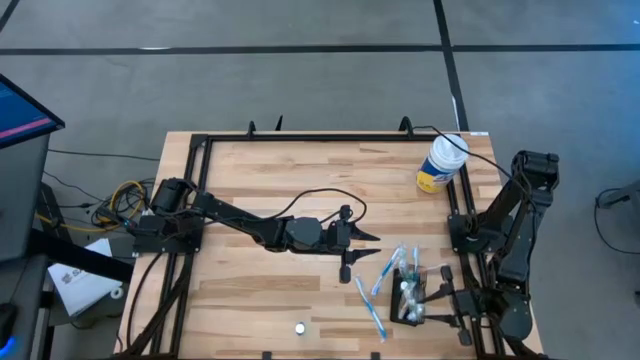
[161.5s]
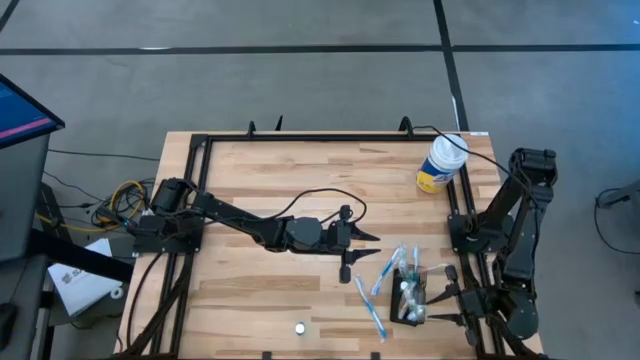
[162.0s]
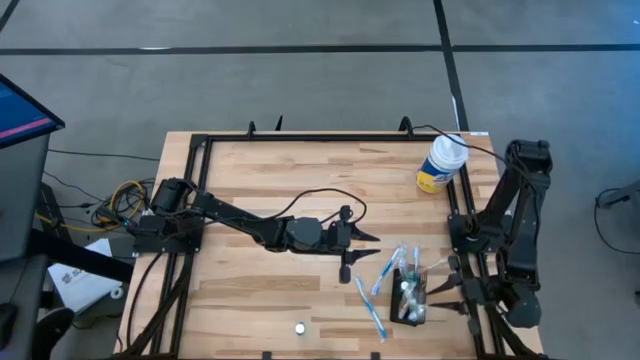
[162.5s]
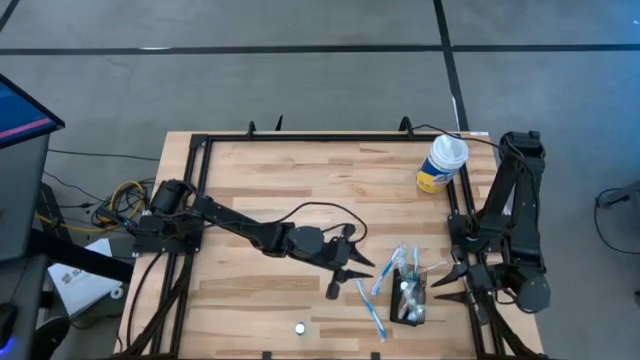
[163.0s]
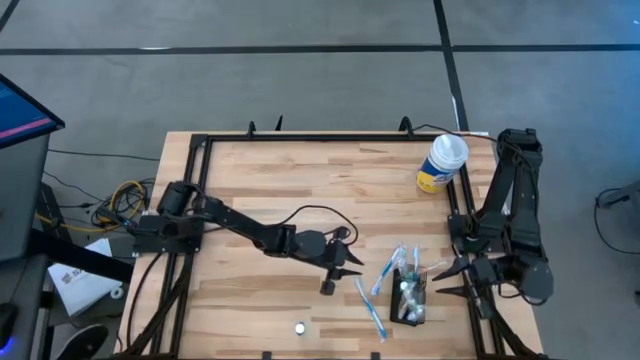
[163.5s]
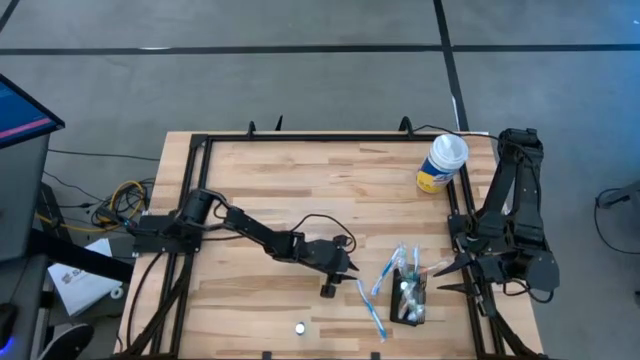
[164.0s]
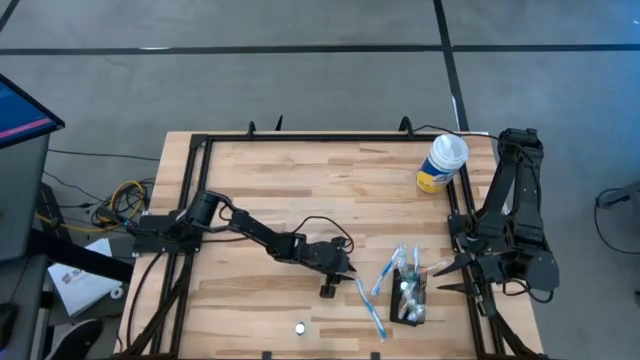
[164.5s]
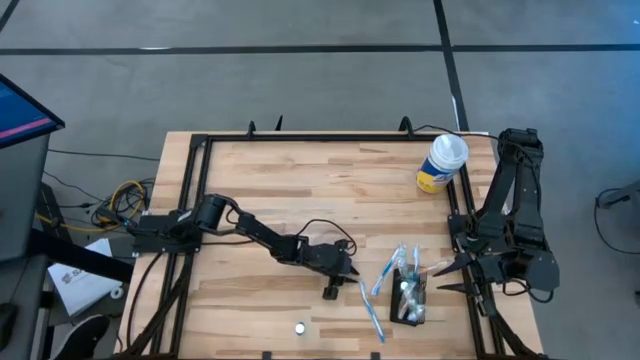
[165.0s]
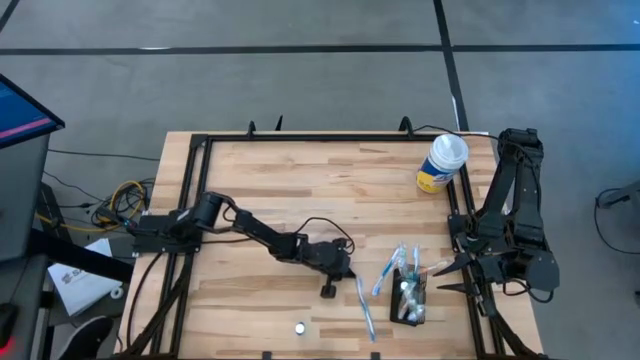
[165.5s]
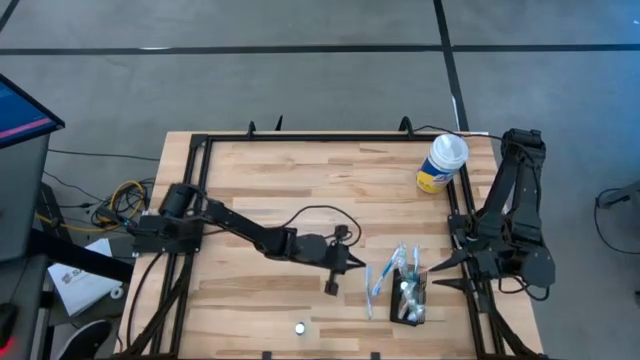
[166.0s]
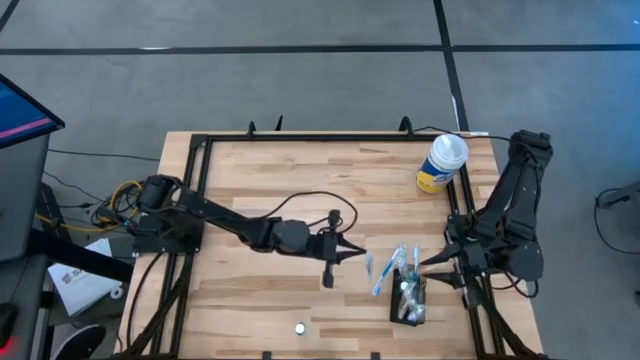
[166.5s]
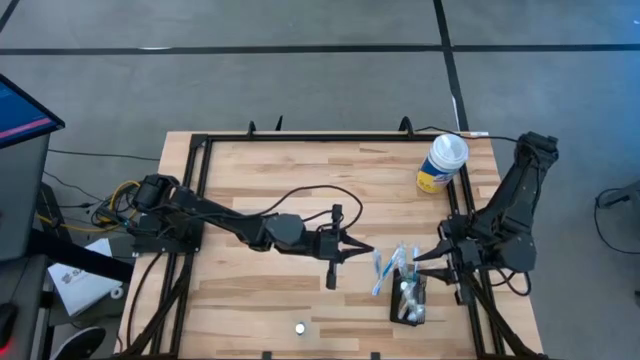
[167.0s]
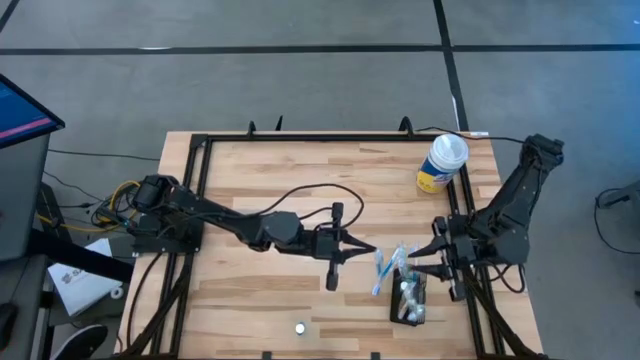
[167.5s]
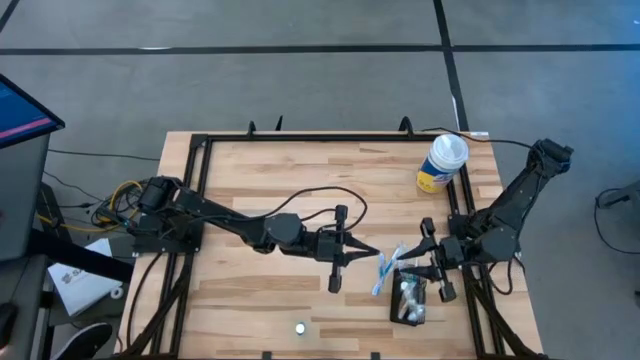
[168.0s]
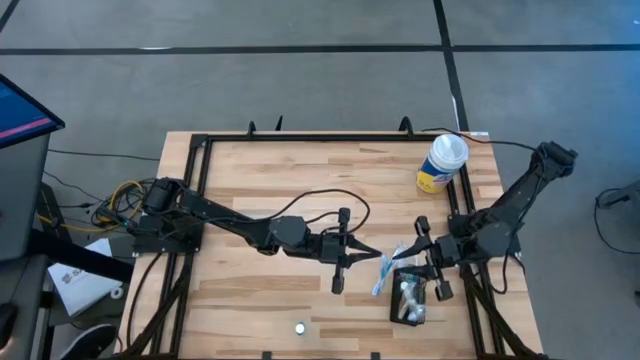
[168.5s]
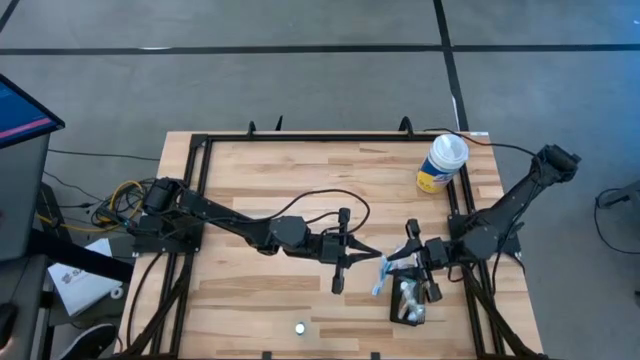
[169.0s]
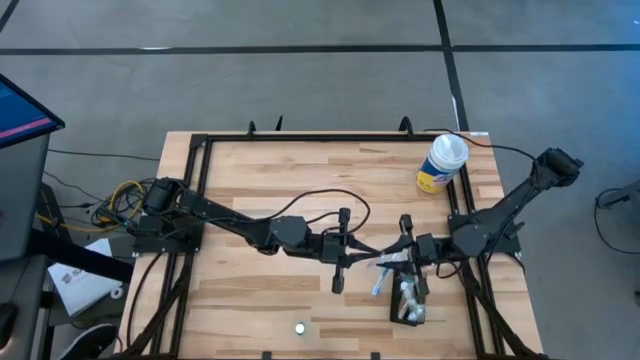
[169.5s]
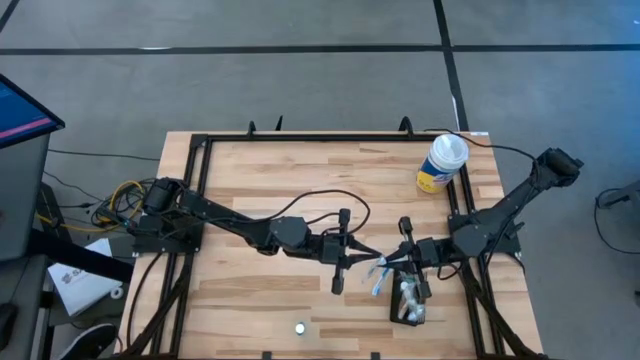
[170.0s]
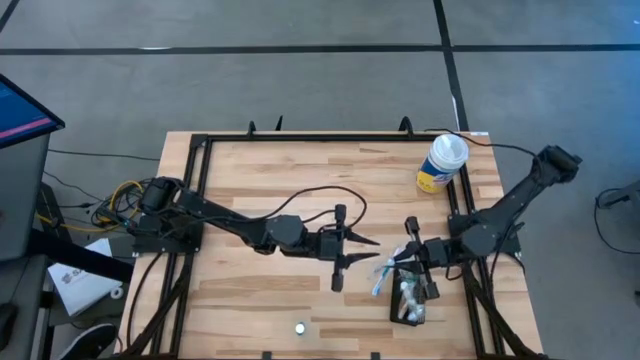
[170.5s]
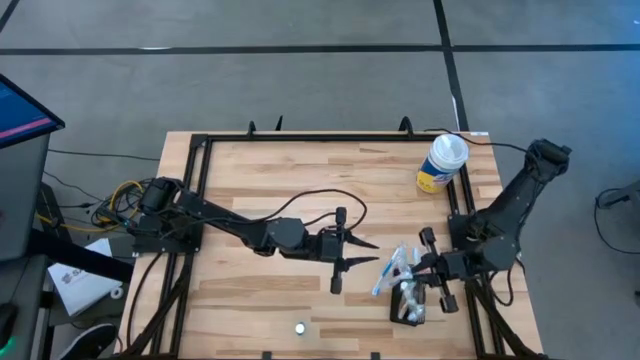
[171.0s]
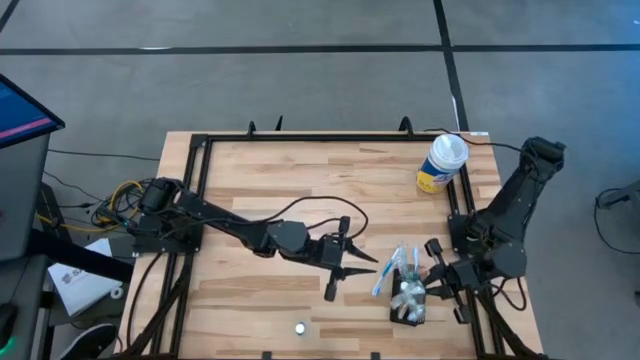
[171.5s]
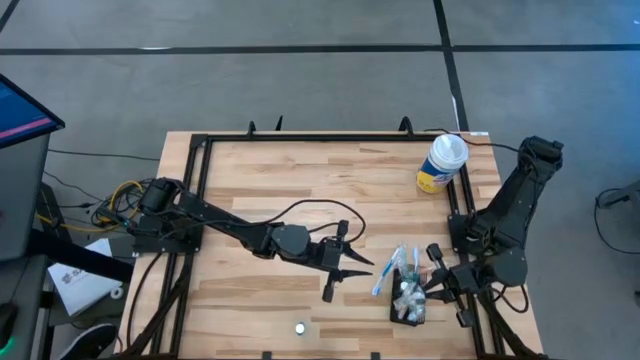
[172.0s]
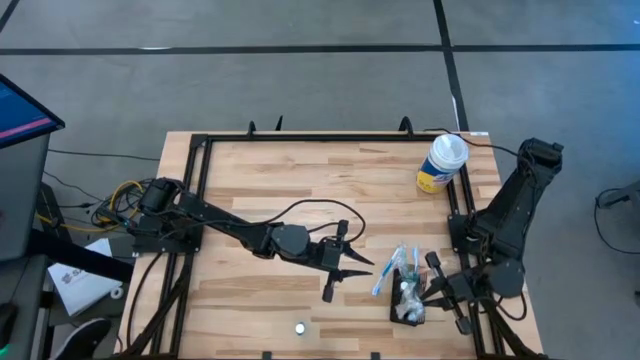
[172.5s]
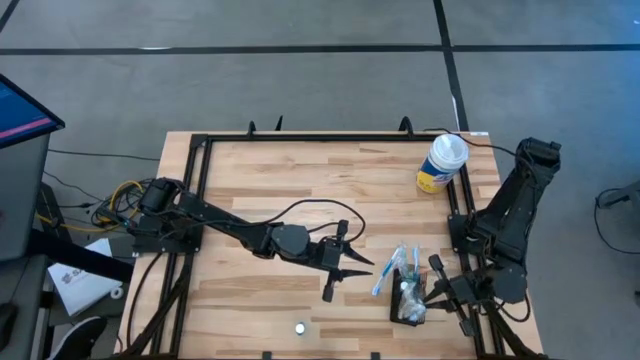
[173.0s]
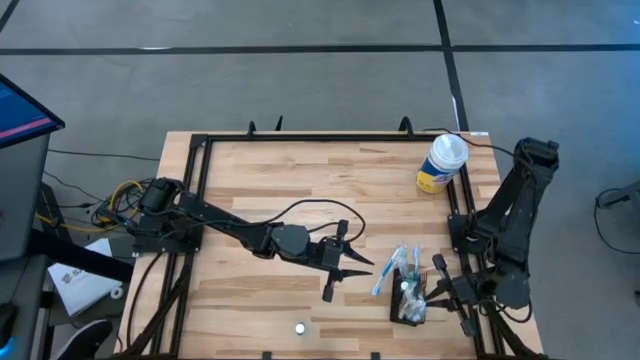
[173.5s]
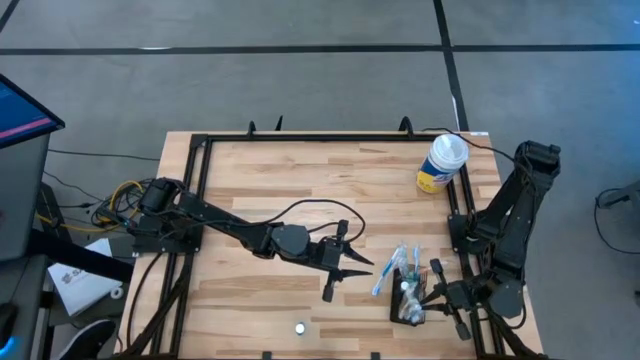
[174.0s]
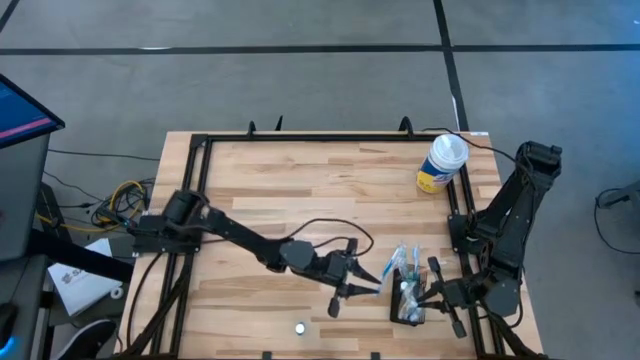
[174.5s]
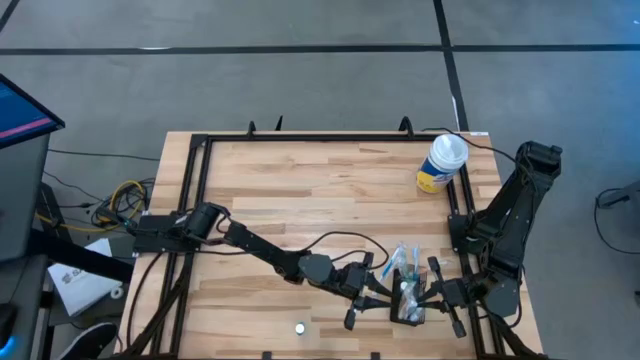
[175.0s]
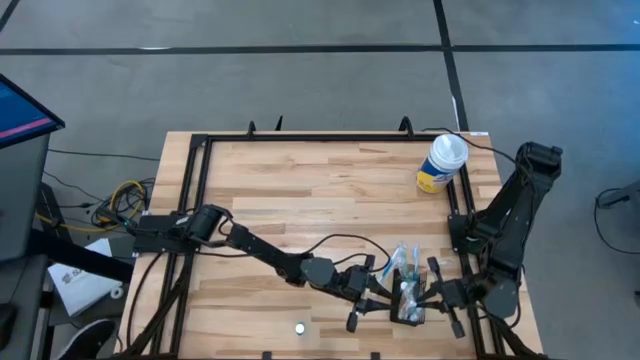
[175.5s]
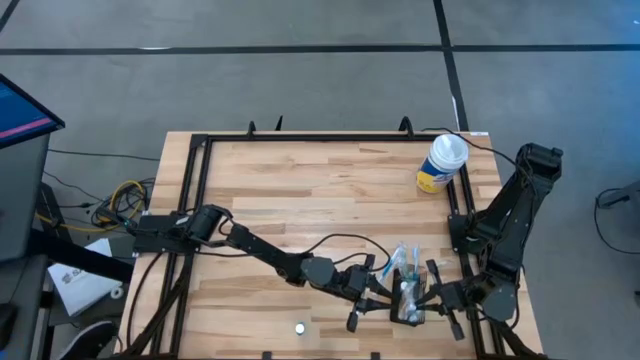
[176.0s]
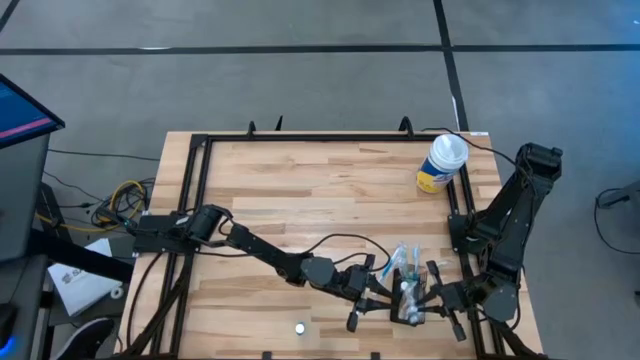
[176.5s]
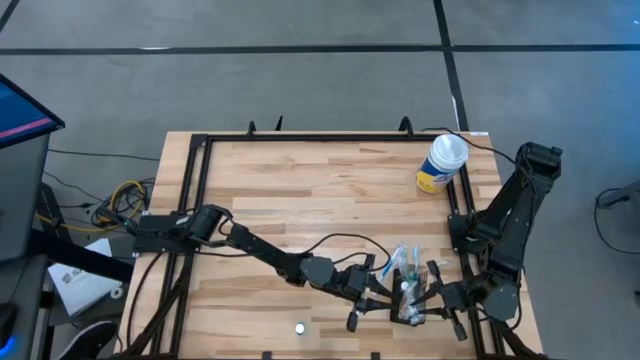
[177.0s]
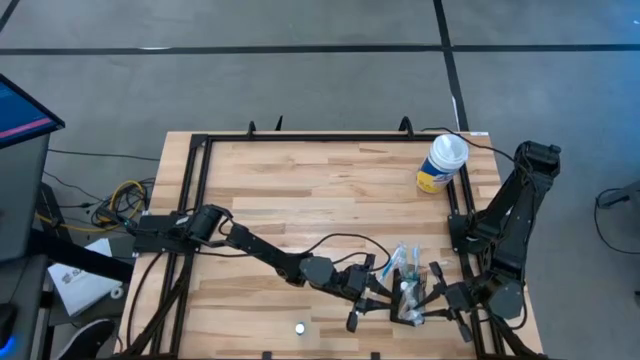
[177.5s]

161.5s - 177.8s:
Task: Pick & Place toothbrushing station
Put the blue toothbrush into the black wire organizer

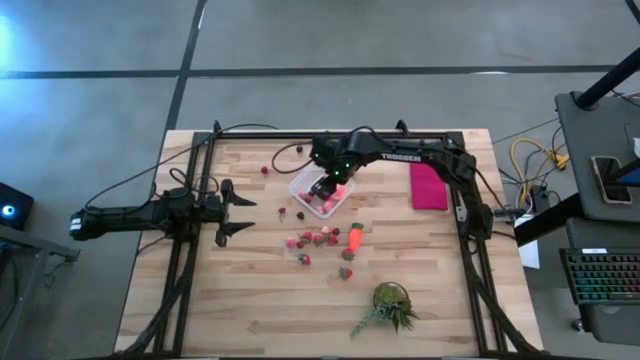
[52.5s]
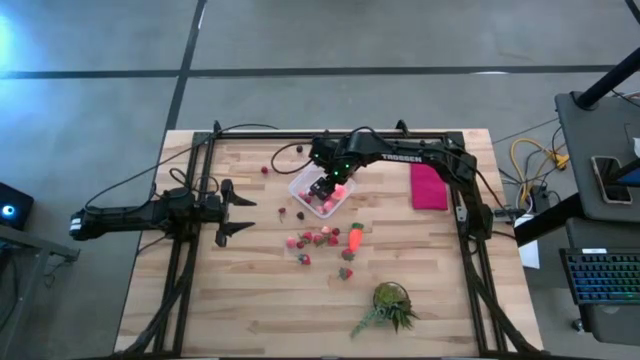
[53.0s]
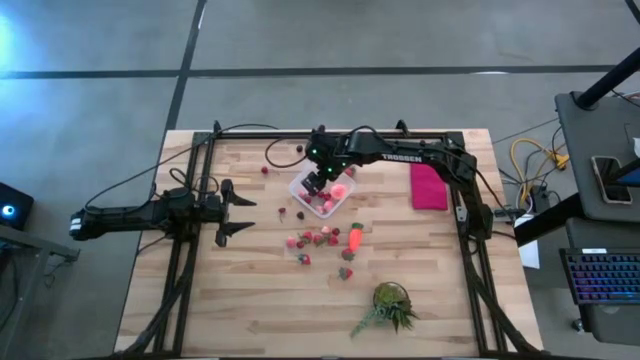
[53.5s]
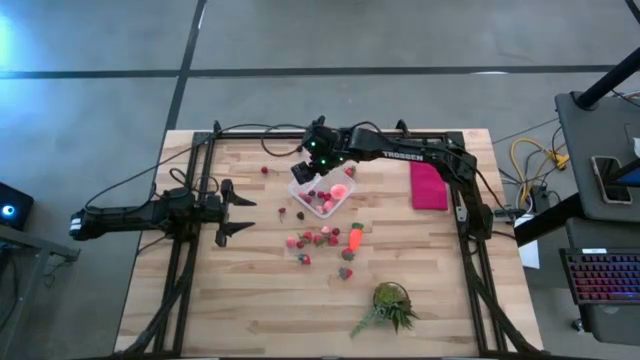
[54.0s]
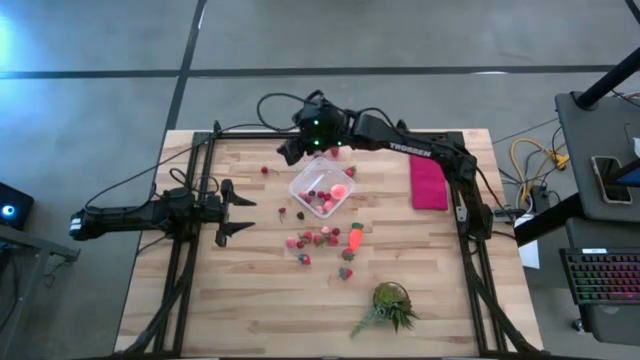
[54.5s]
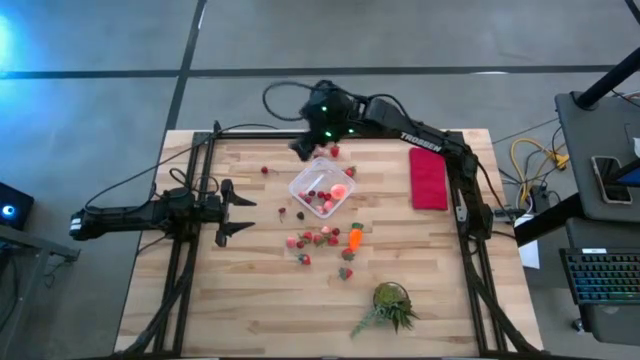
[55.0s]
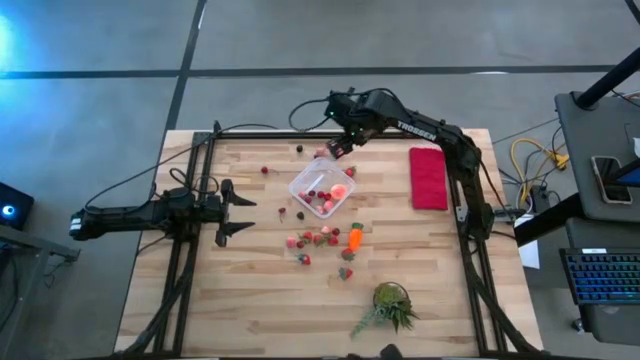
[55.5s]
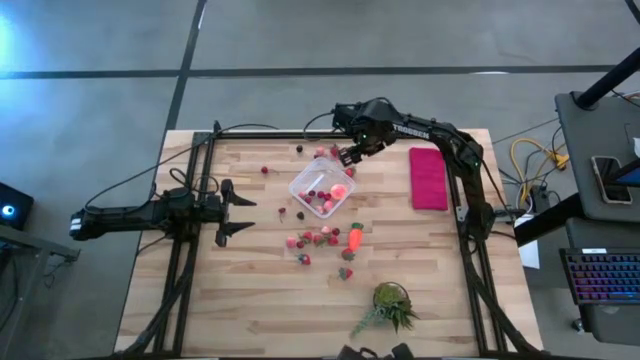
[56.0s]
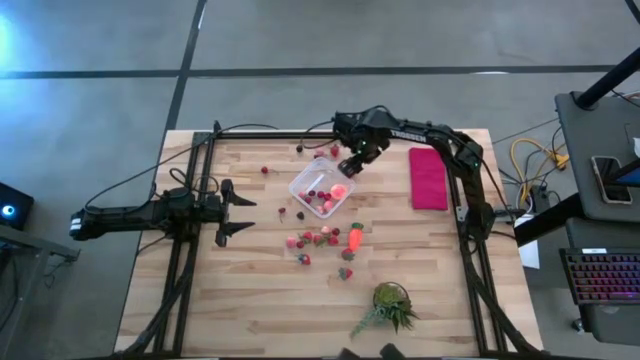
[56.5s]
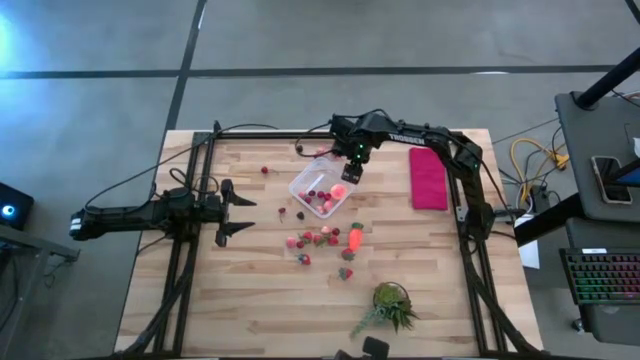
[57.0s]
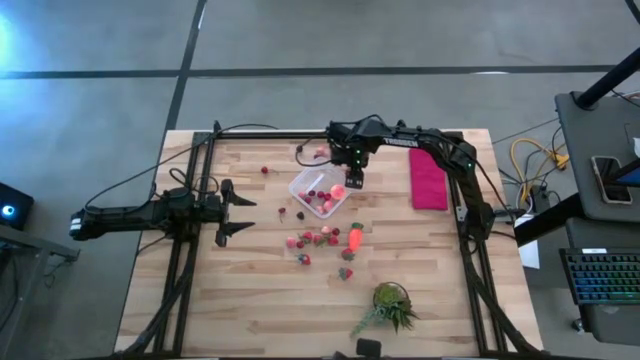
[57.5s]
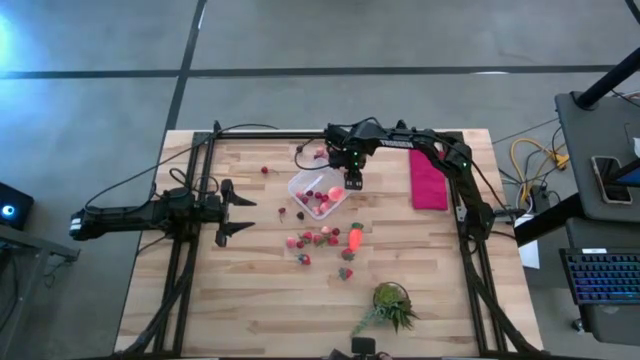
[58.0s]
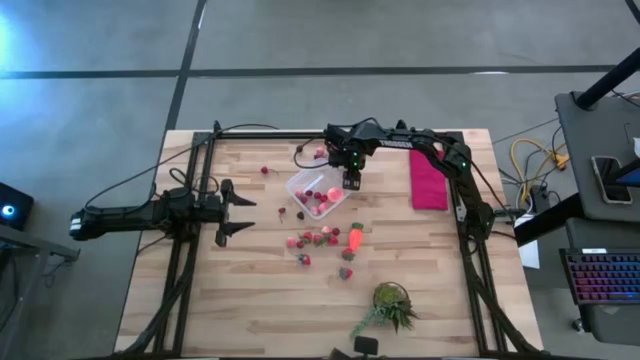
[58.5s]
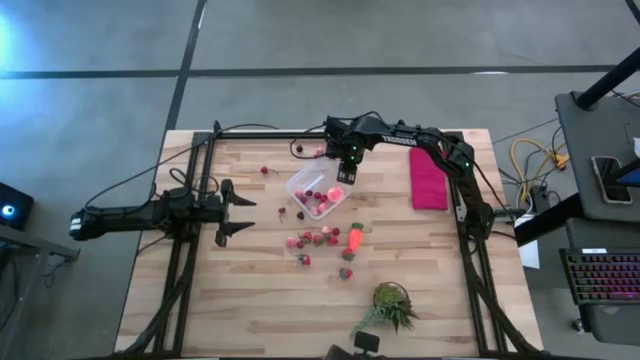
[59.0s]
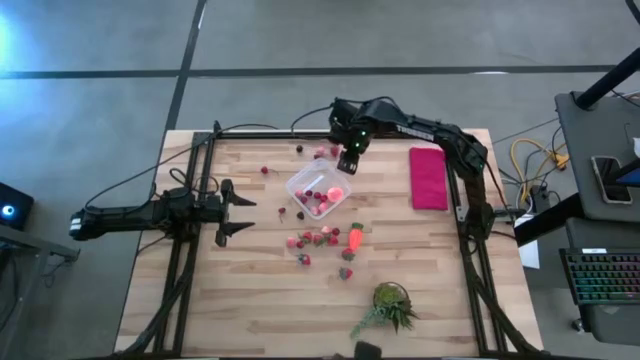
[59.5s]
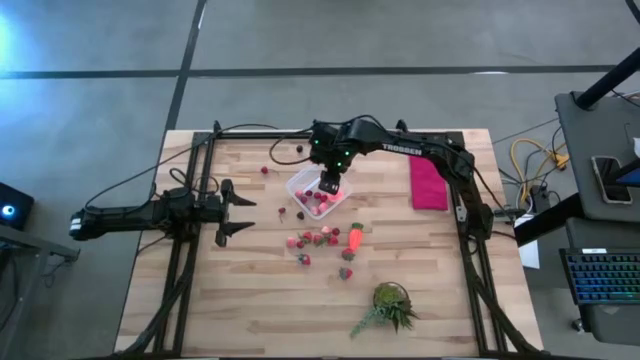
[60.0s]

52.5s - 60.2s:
Task: Pick and placing Produce into tupperware
Put the red strawberry into the transparent container
